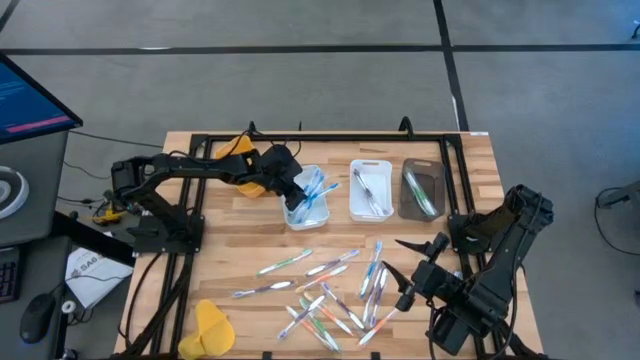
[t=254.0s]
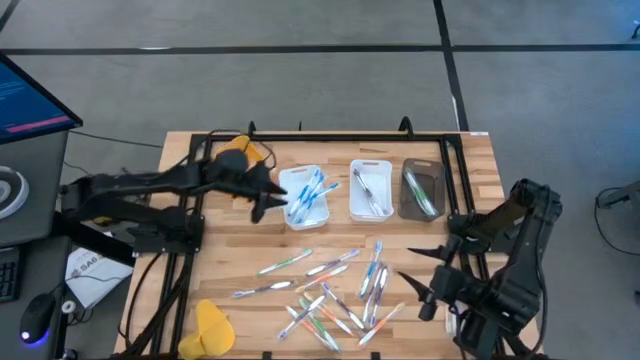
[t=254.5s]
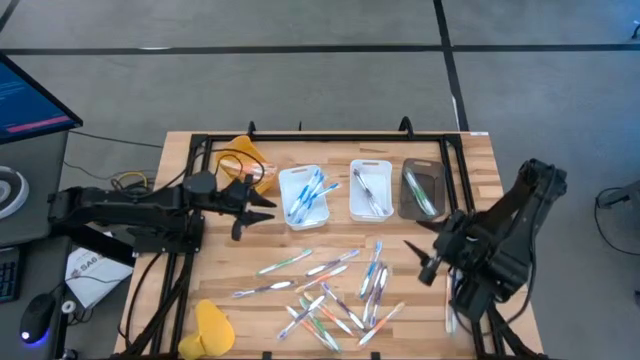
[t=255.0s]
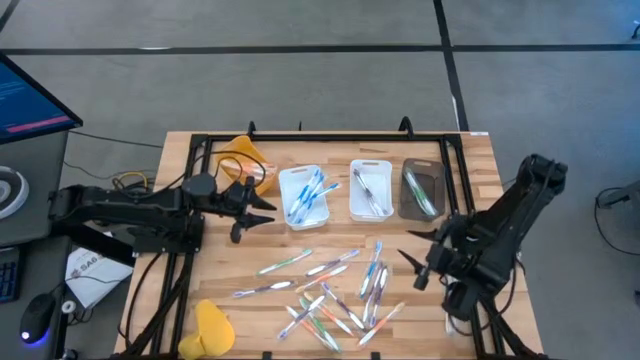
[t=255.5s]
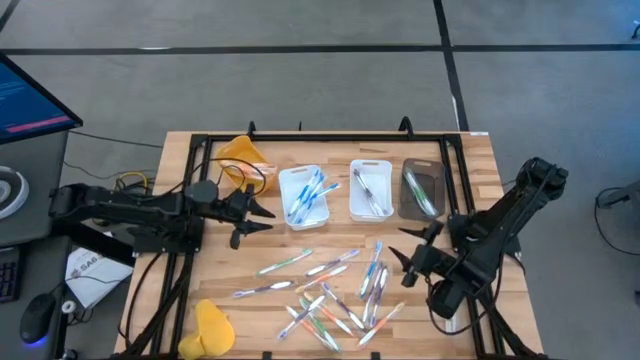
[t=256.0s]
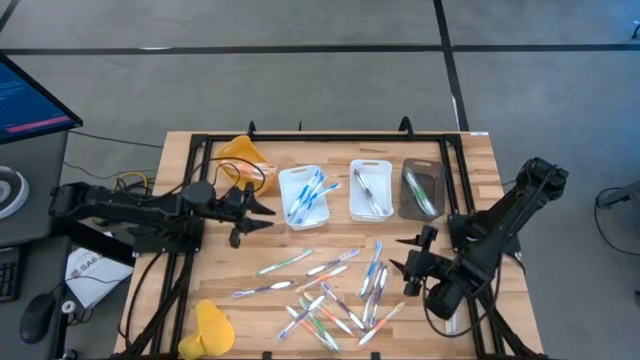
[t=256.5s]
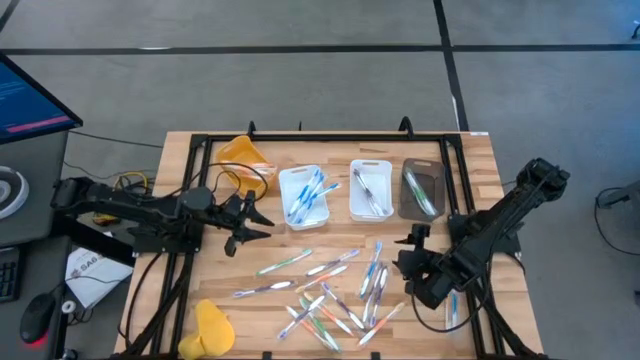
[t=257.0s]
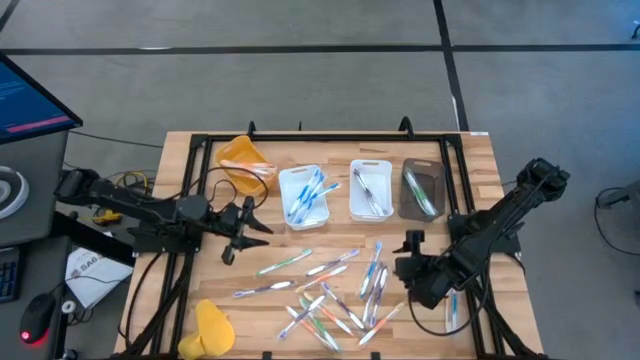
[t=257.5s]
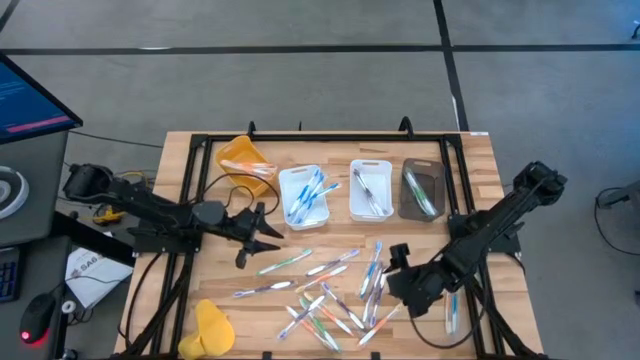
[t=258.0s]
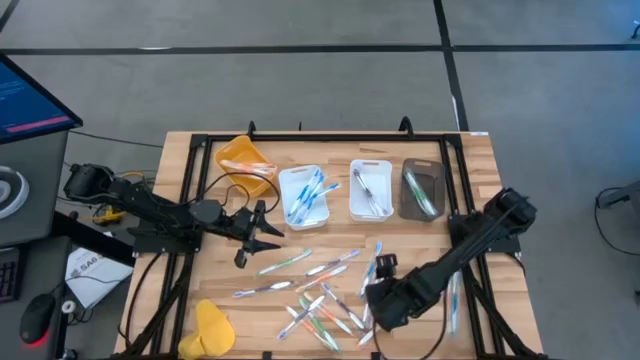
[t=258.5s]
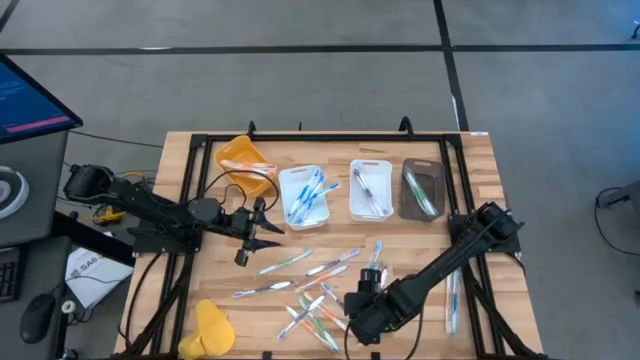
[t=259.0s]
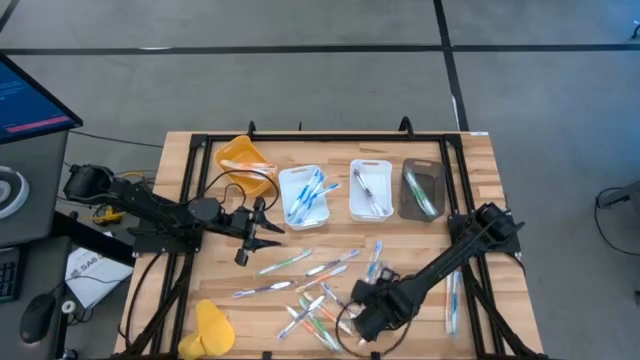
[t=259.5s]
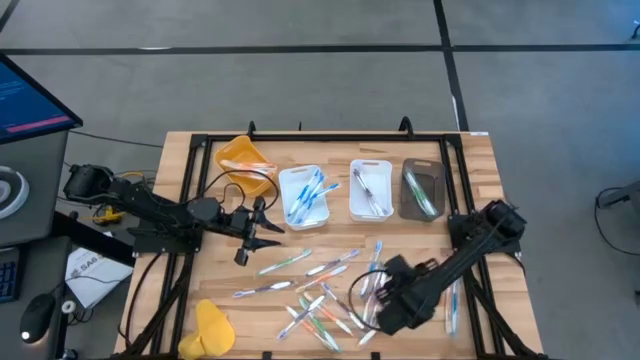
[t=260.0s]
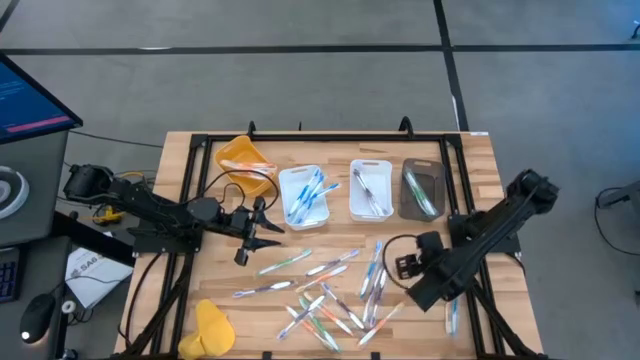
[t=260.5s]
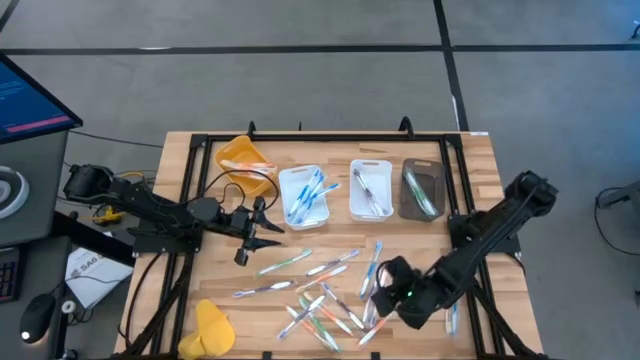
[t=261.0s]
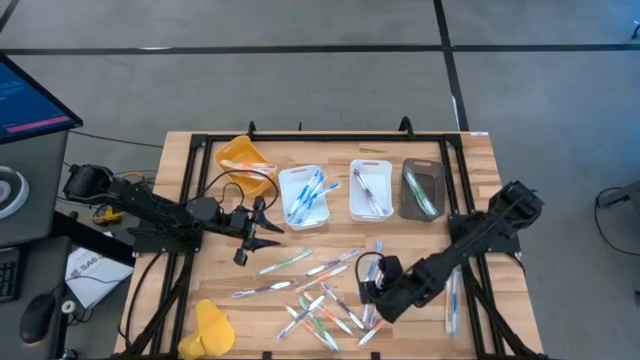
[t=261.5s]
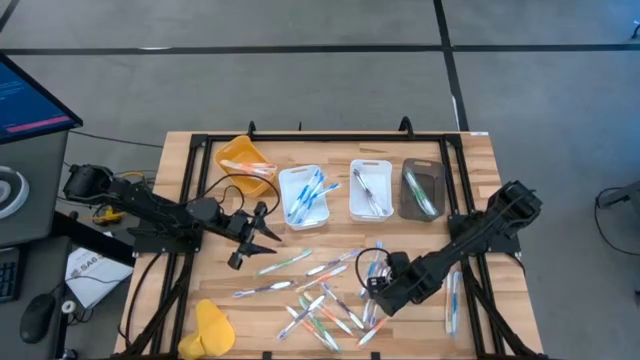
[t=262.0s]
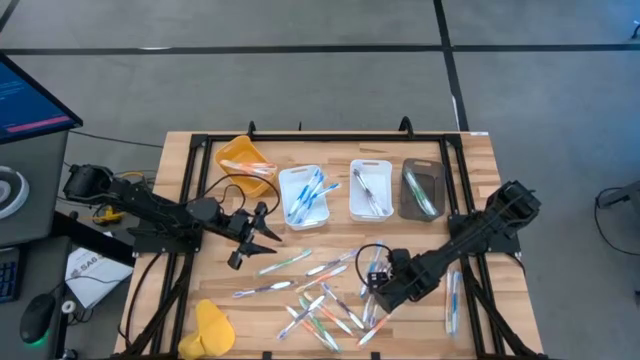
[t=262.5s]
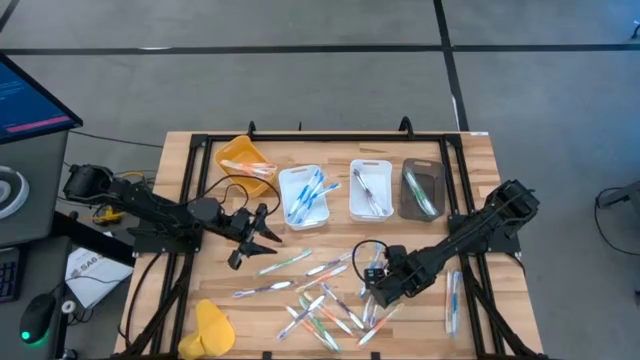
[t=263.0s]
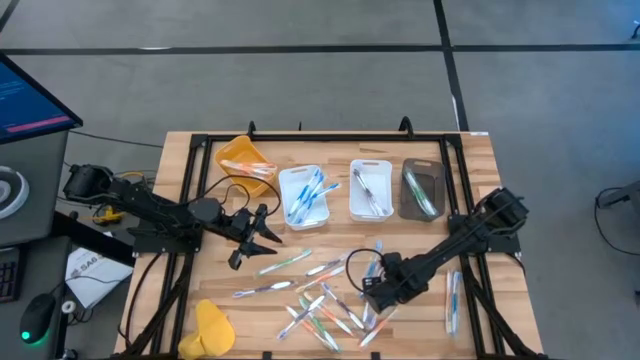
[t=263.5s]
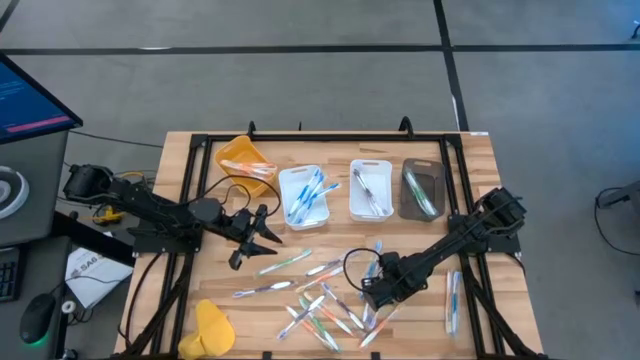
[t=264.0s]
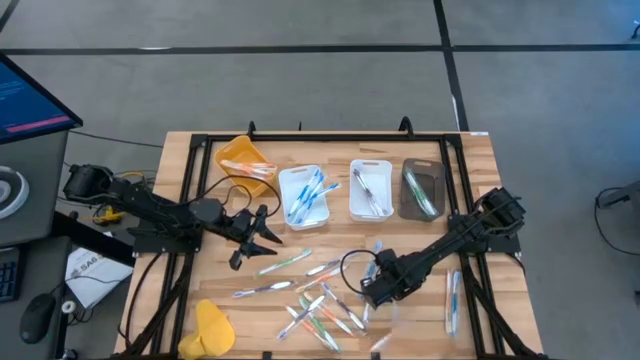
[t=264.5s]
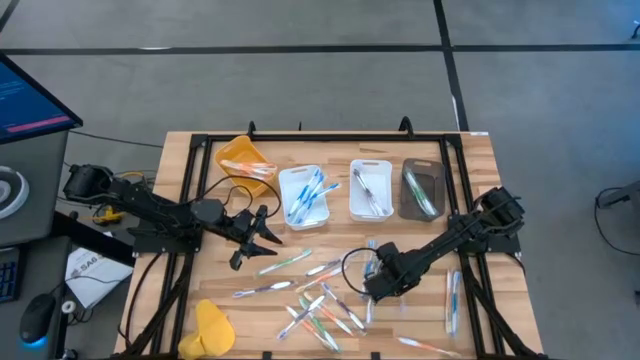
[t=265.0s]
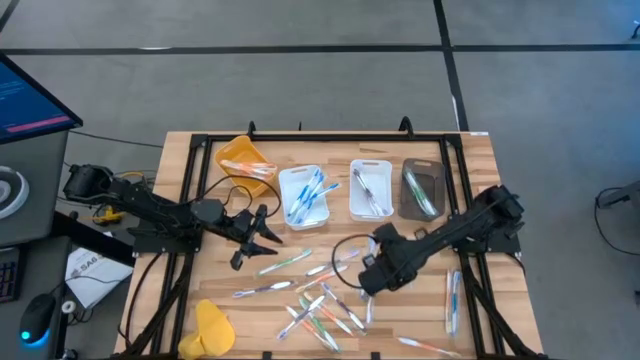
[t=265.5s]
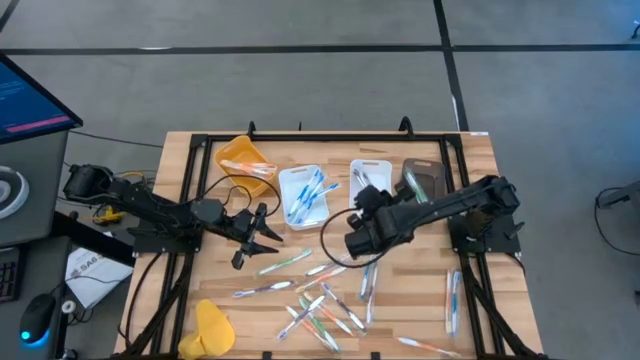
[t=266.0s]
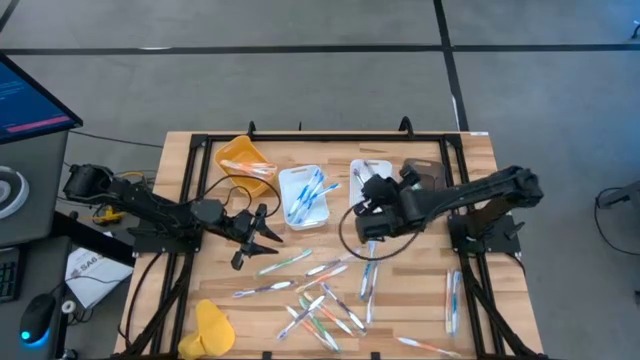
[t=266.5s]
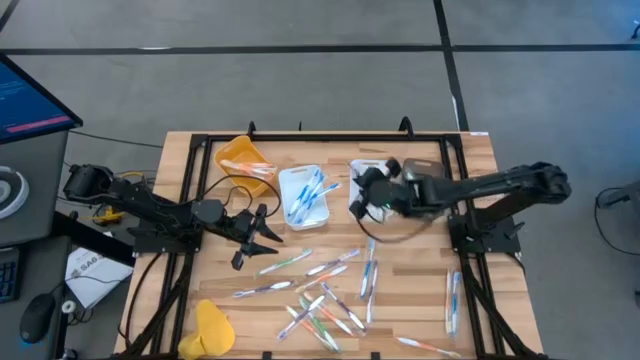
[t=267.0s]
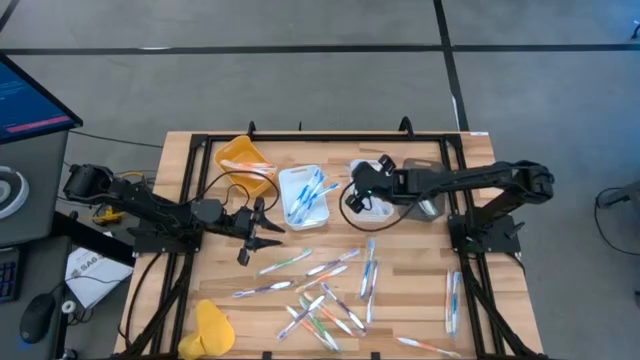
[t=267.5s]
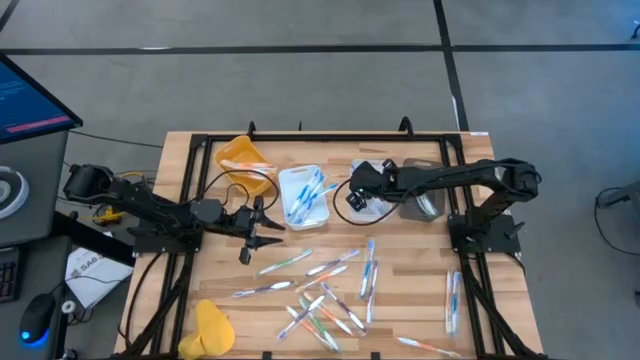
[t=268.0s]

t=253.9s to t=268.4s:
Task: Pick & Place Toothbrushes
Put the purple toothbrush into the right white bin

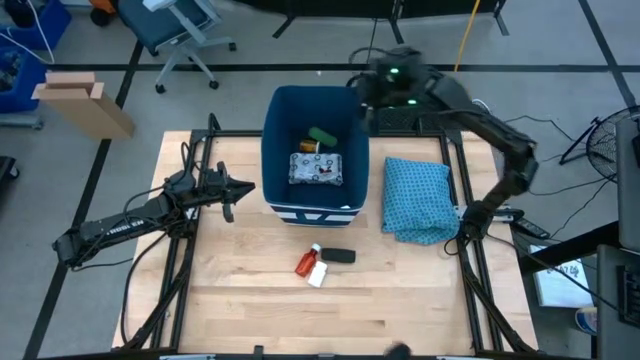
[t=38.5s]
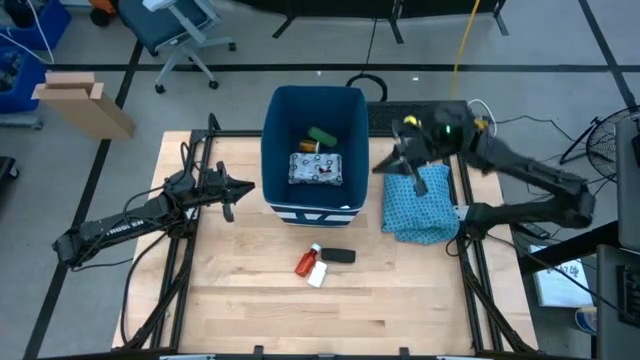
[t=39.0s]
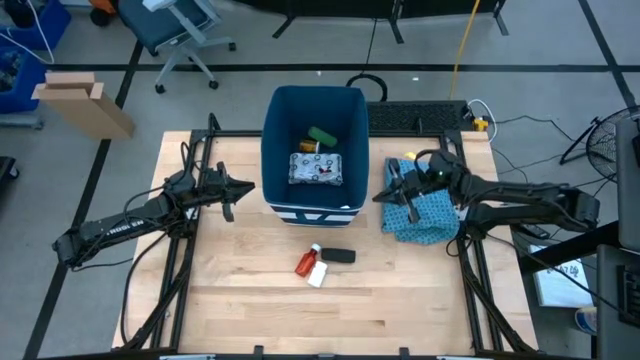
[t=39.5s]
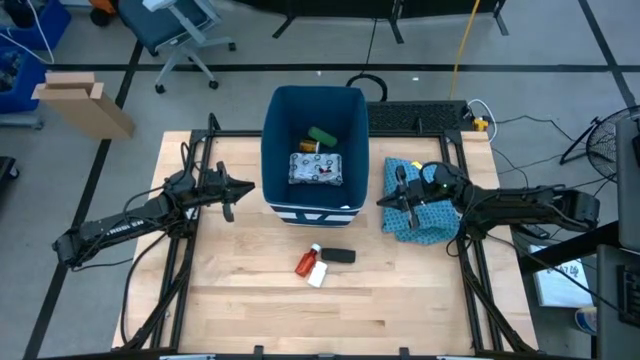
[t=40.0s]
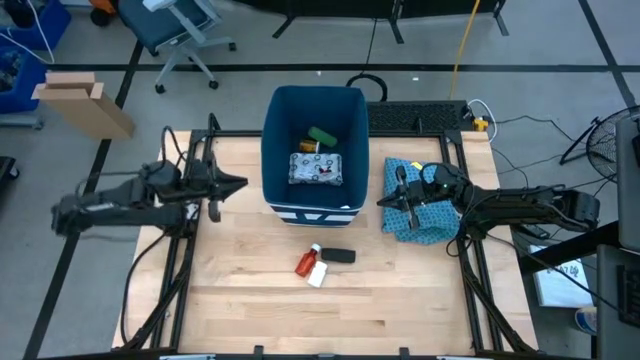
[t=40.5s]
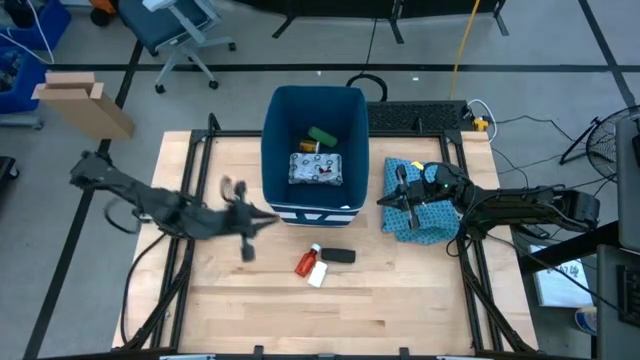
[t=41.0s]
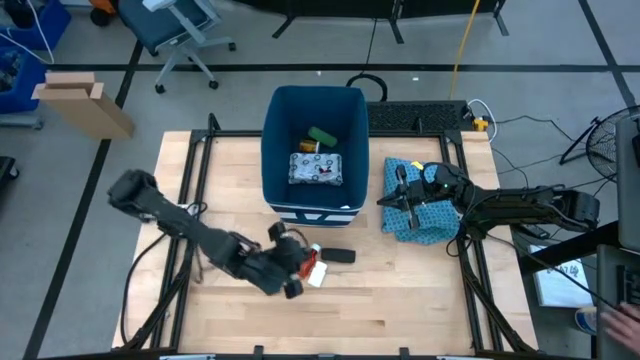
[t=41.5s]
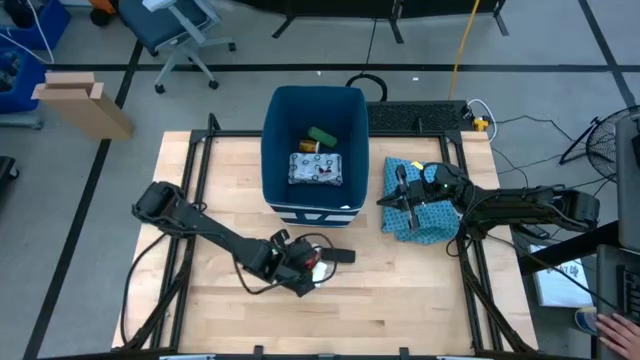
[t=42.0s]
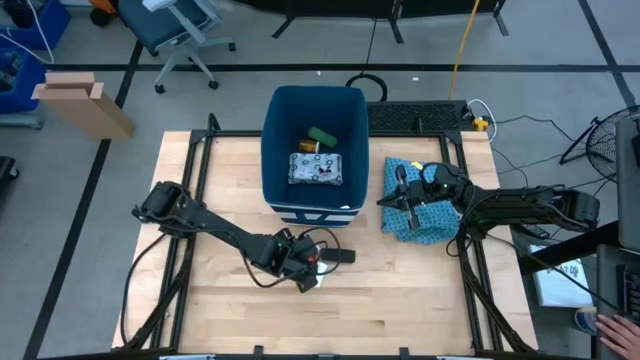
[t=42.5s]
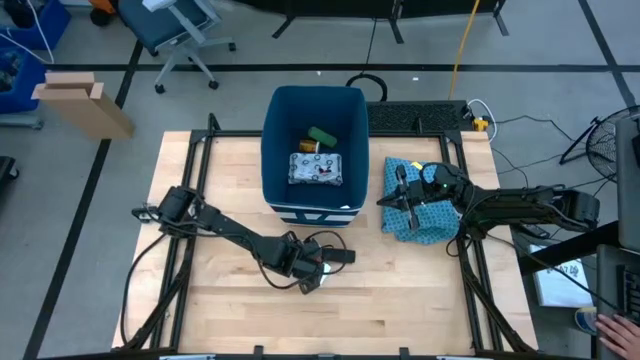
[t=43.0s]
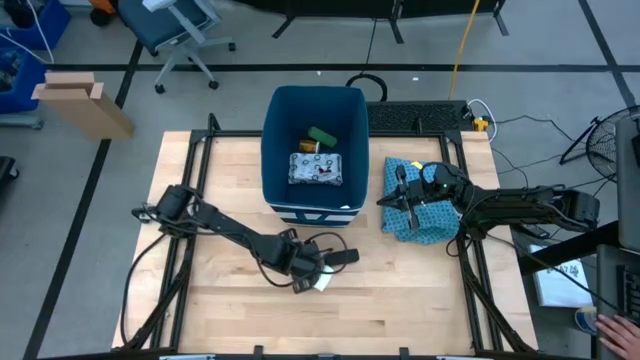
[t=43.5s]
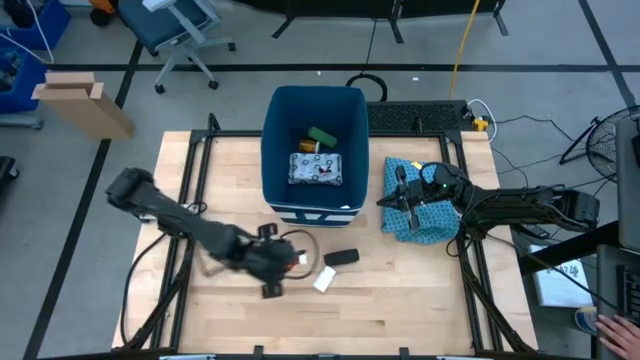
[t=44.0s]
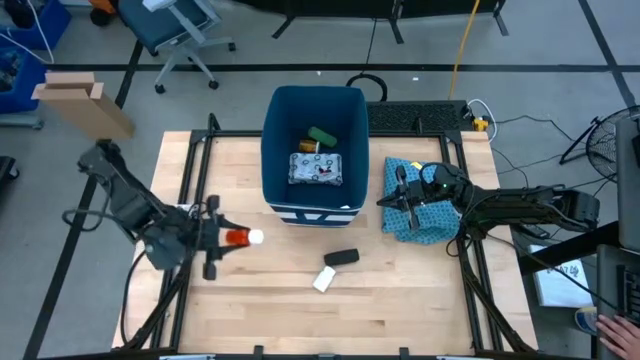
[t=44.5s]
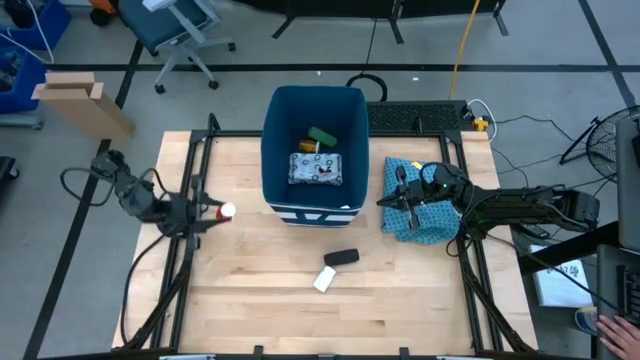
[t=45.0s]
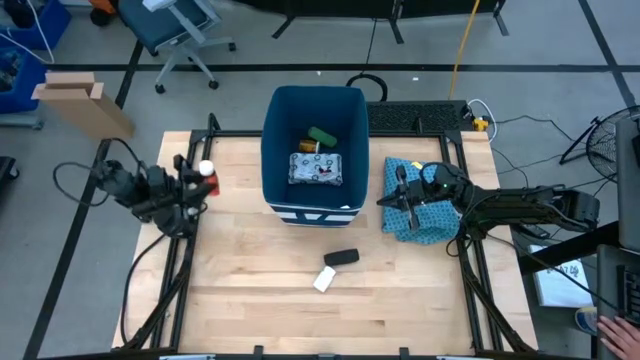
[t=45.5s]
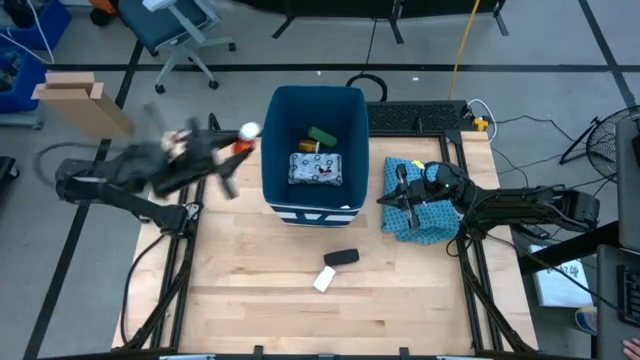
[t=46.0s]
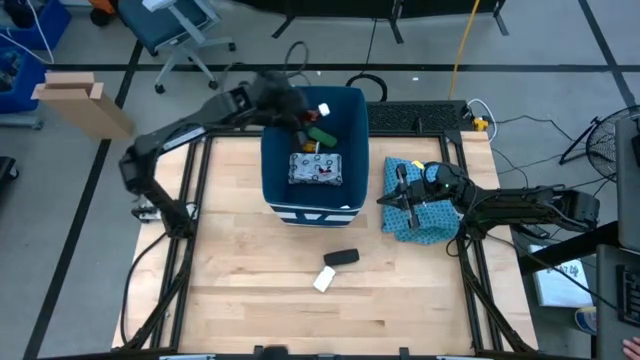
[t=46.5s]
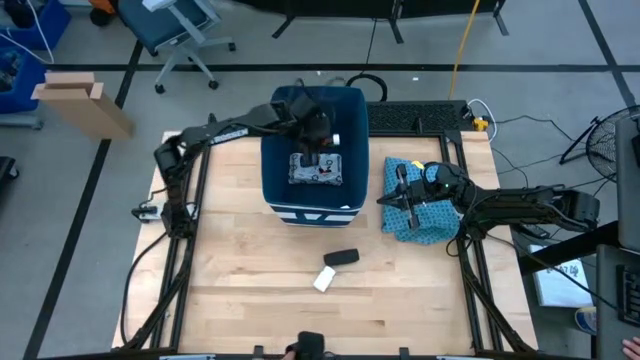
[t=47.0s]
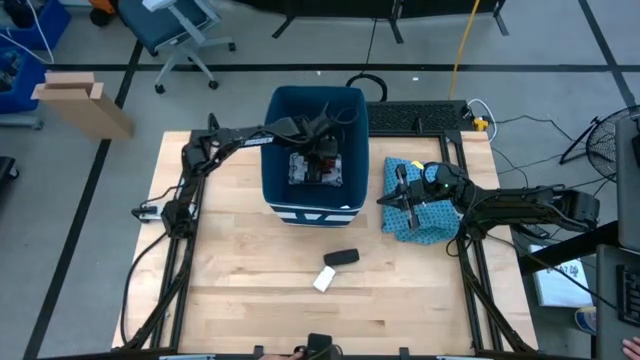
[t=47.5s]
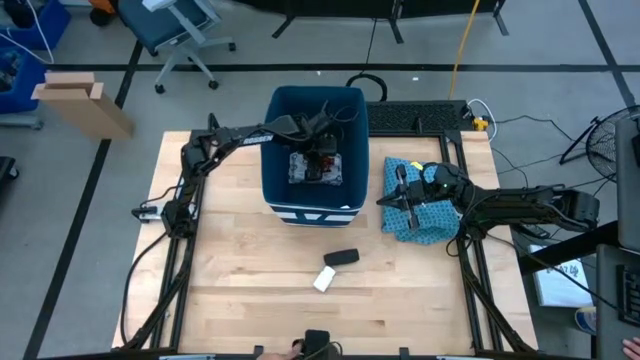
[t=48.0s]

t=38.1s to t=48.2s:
Task: Pick & place medical supplies in basket/bin
Put the orange pill bottle into the blue bin
